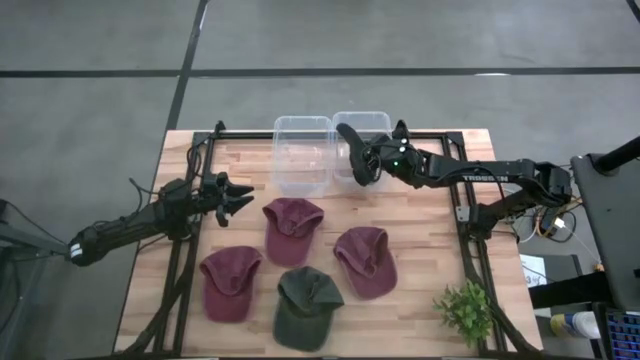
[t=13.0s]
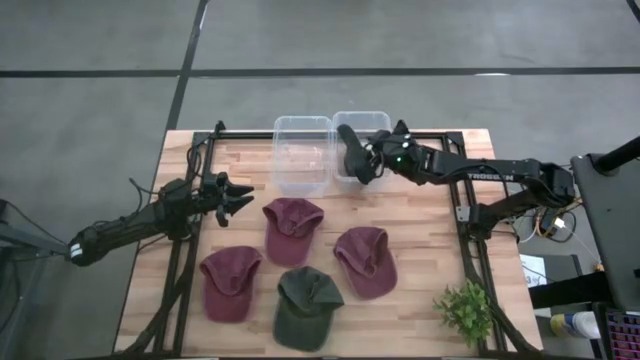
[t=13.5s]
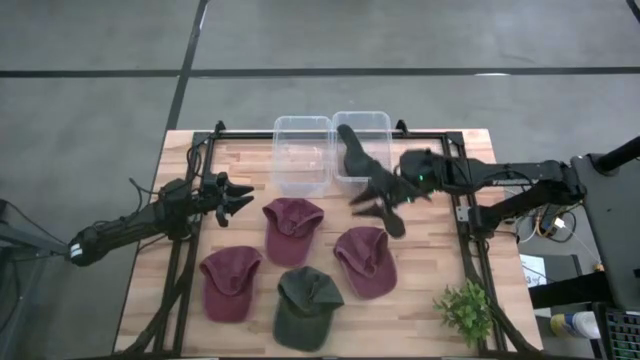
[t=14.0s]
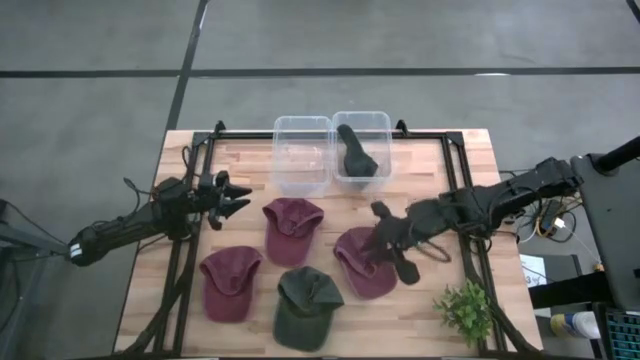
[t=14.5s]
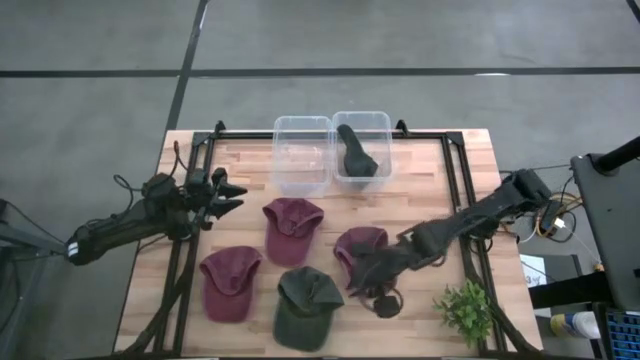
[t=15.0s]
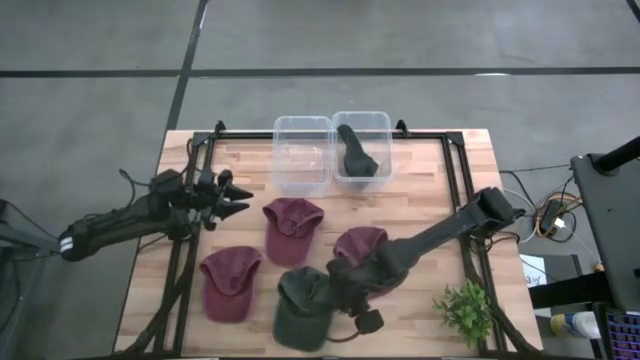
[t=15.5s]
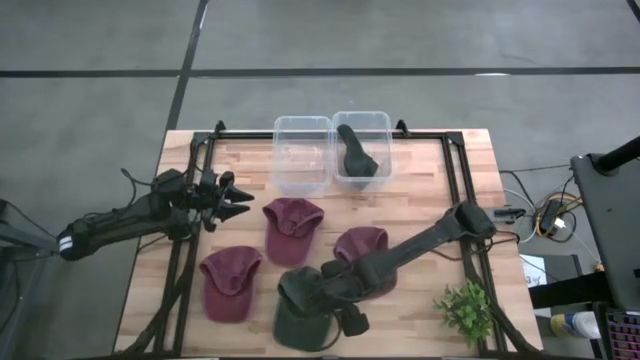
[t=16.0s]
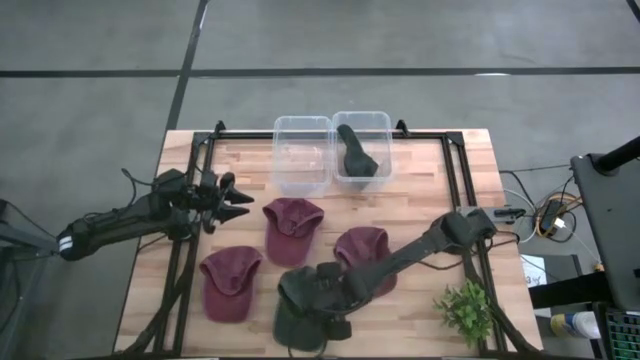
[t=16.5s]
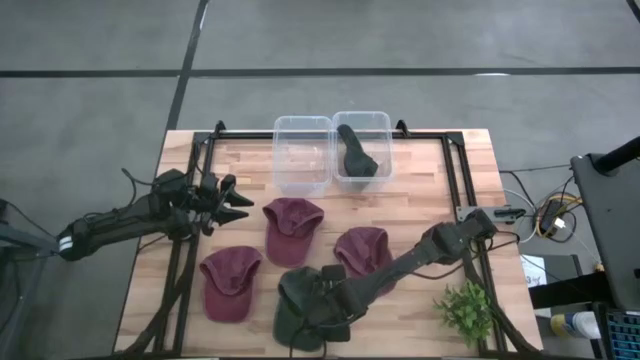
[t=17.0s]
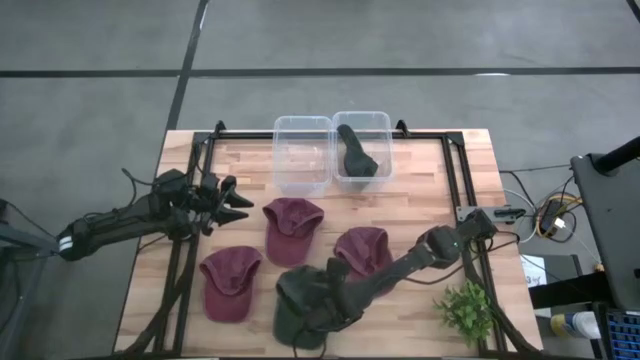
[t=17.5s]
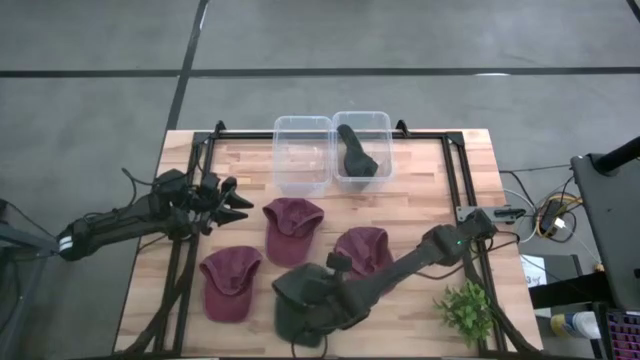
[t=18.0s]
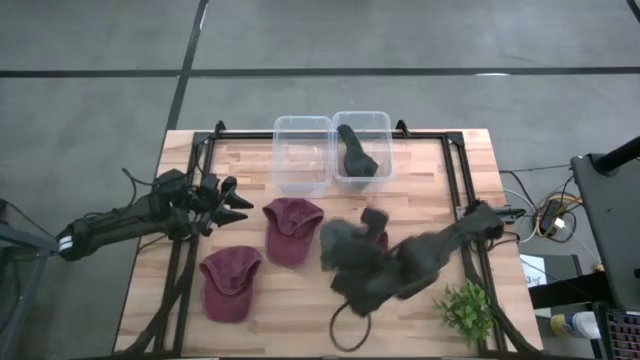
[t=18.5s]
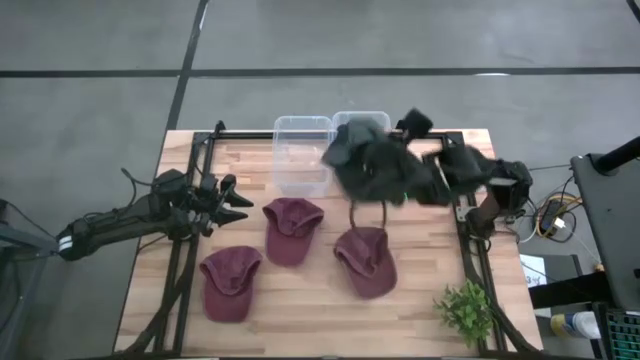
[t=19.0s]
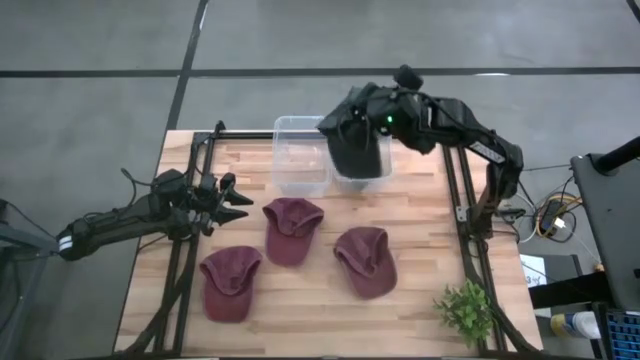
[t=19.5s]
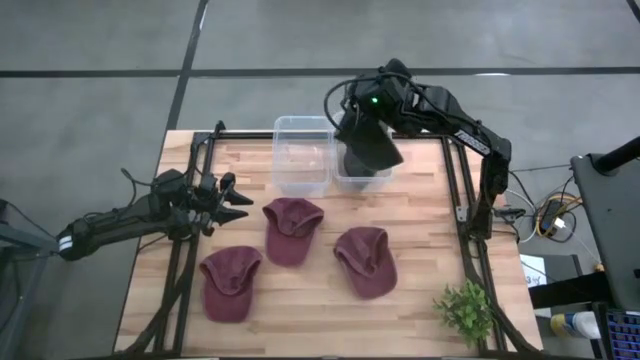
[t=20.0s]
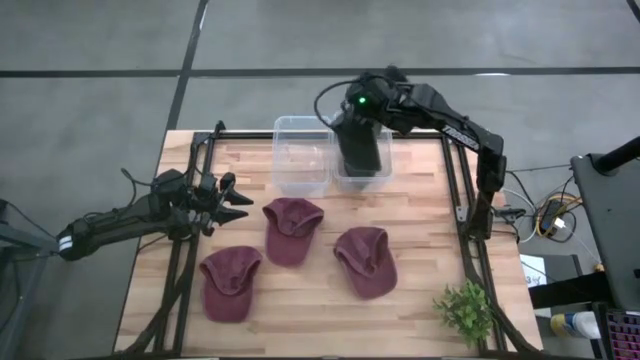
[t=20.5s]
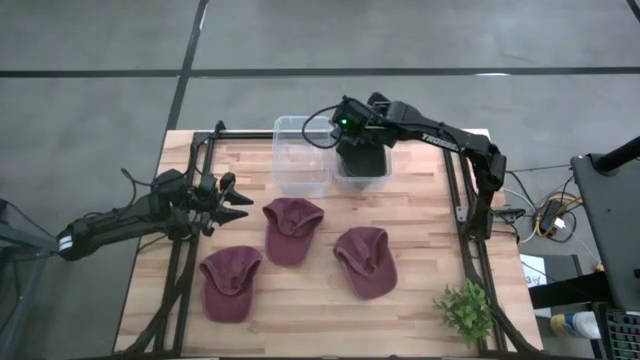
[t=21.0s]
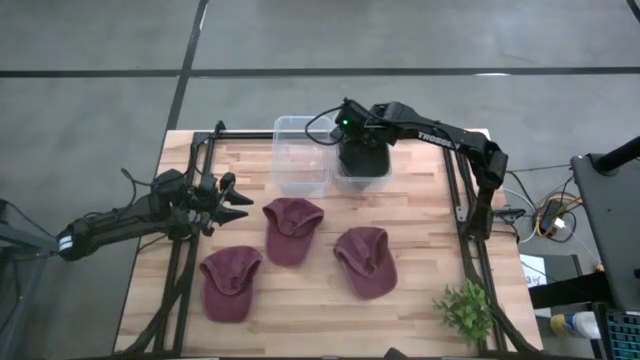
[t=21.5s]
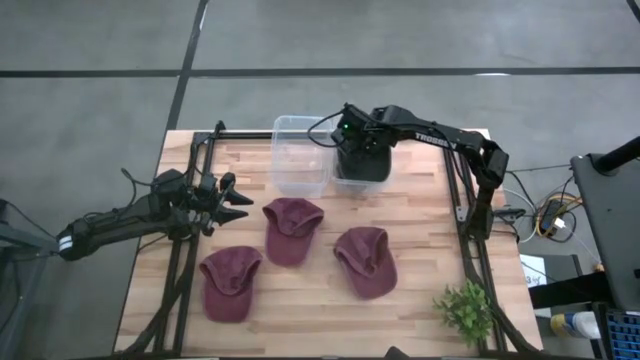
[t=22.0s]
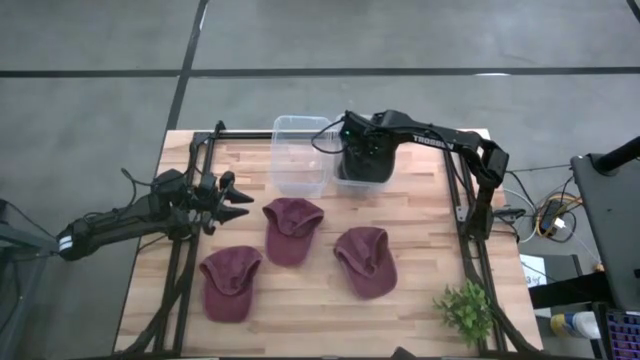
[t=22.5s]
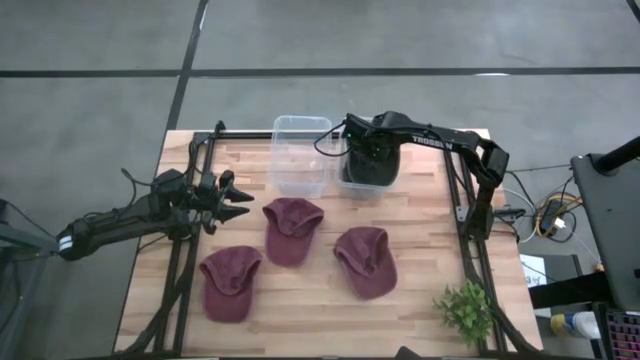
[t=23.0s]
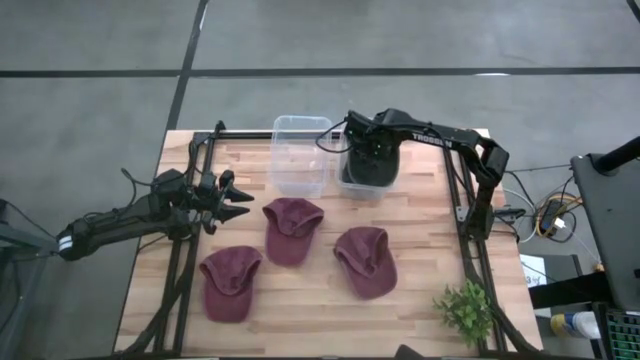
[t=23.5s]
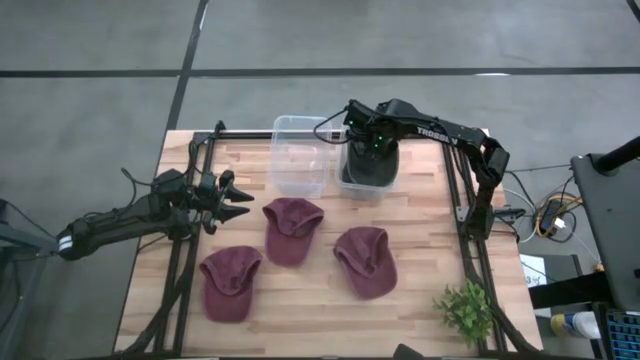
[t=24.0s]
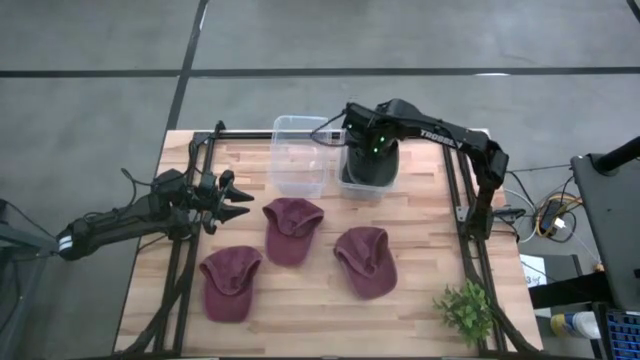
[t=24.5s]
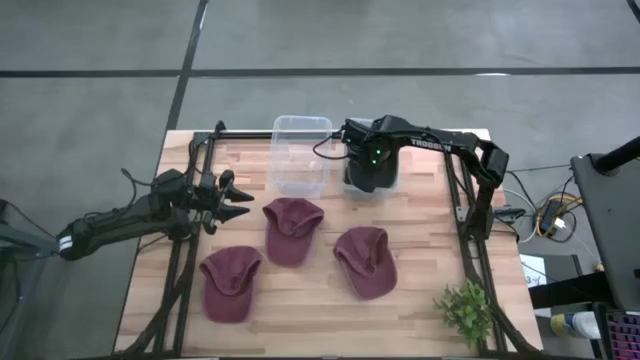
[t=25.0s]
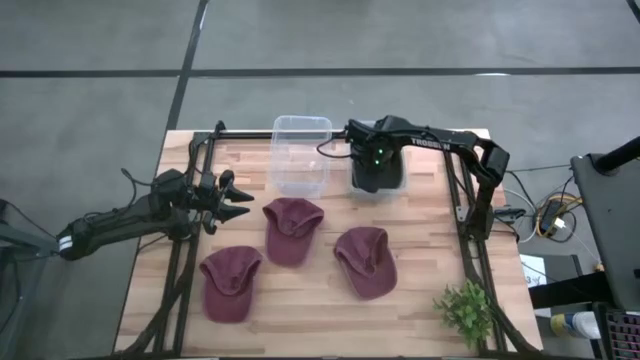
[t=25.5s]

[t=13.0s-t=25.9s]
Task: Pick & Place hat
Put the green cap into the right transparent bin

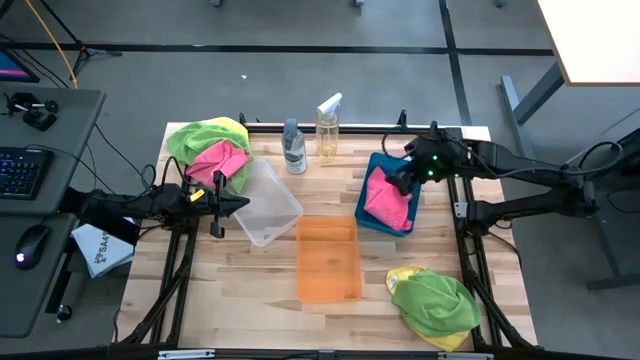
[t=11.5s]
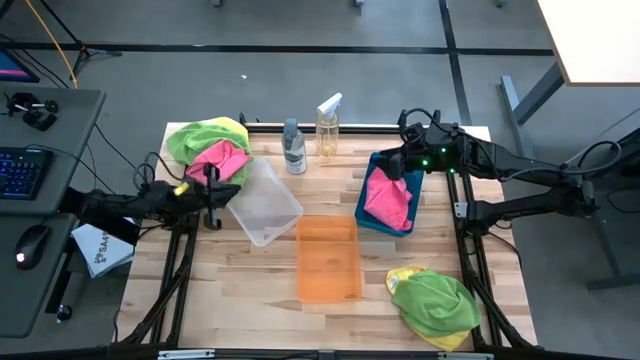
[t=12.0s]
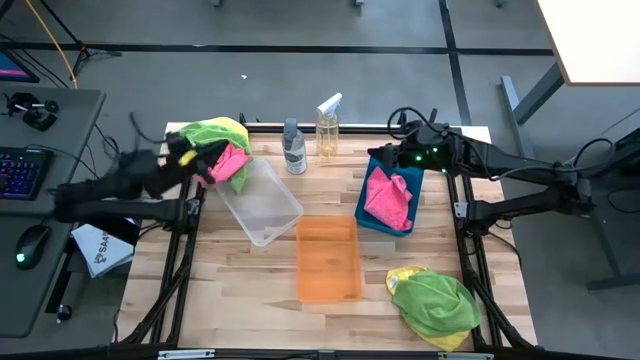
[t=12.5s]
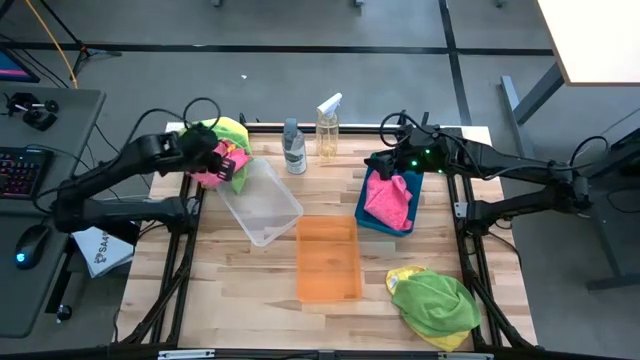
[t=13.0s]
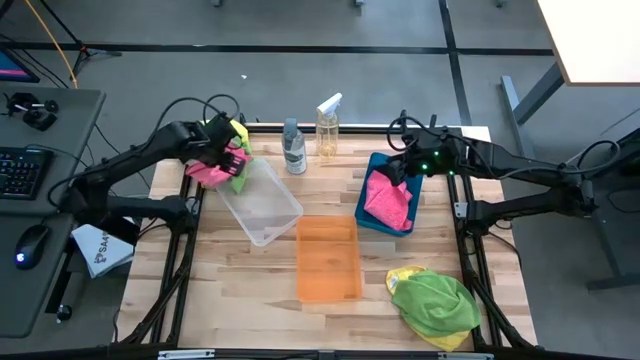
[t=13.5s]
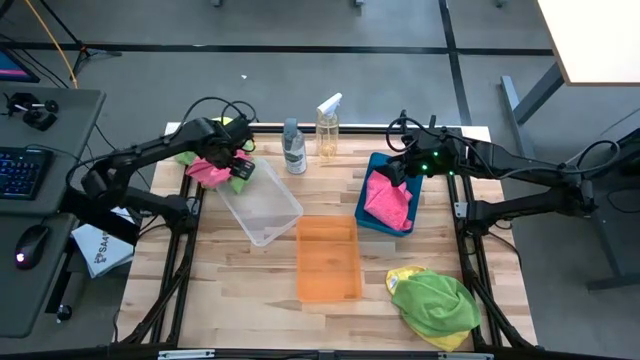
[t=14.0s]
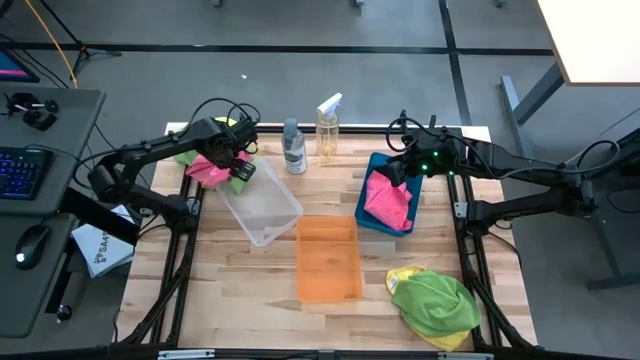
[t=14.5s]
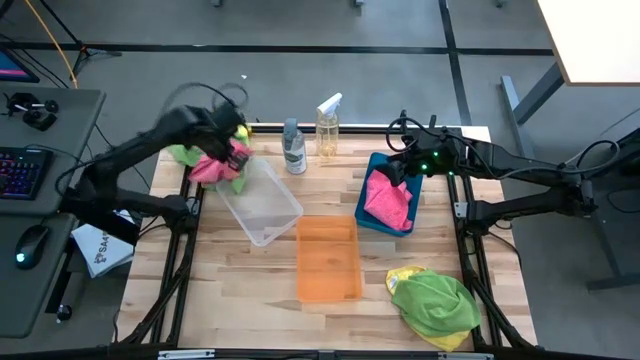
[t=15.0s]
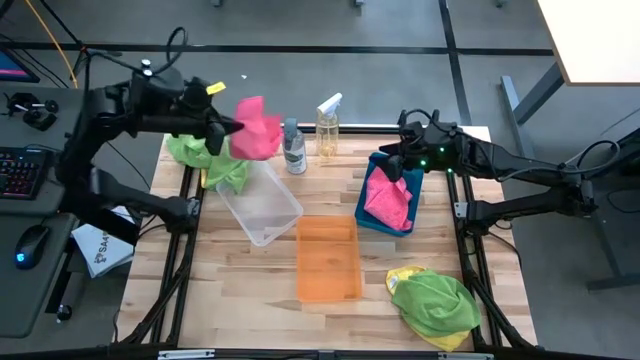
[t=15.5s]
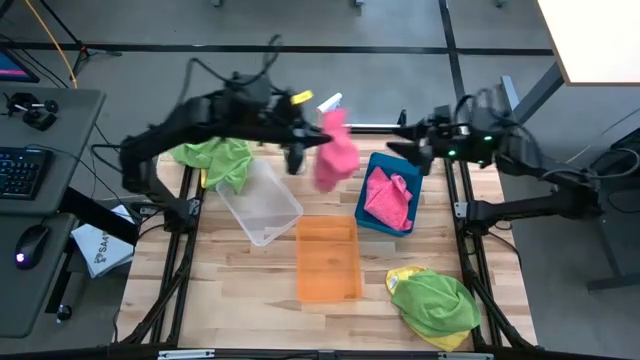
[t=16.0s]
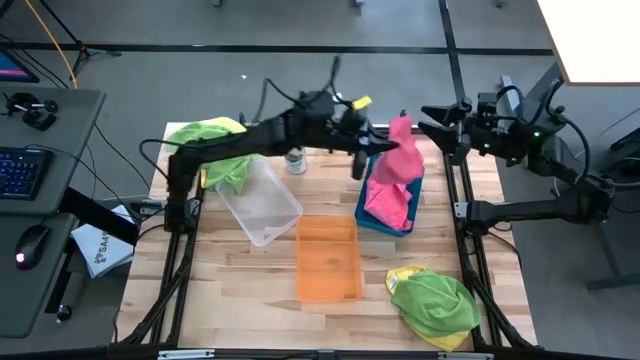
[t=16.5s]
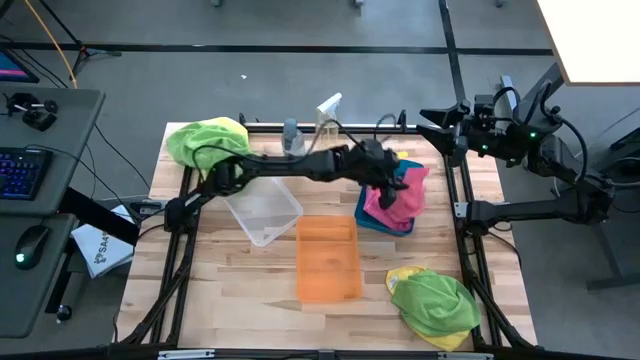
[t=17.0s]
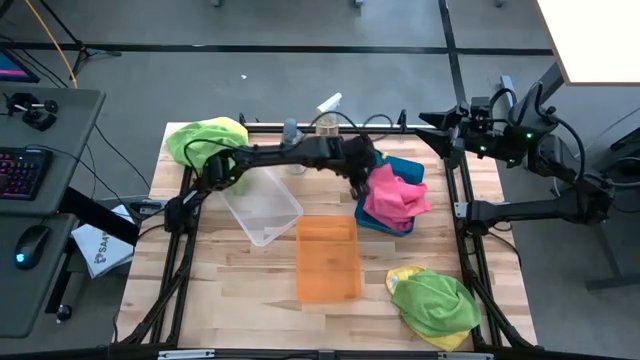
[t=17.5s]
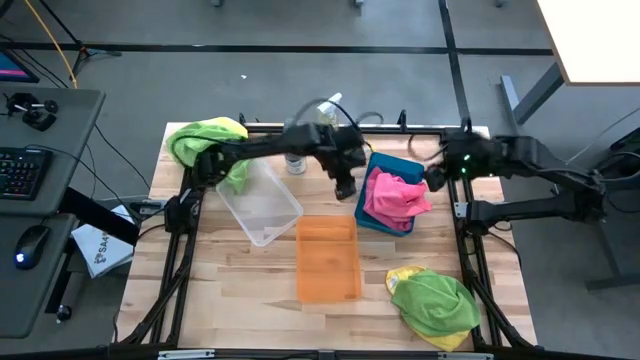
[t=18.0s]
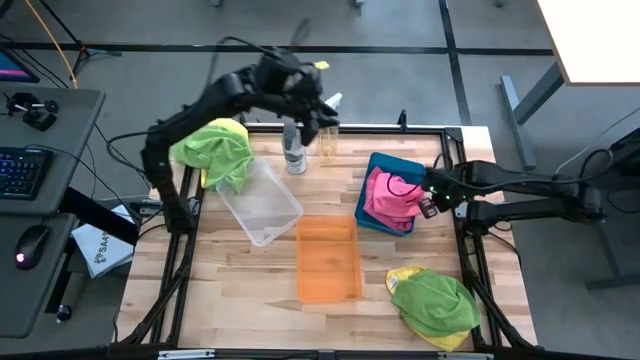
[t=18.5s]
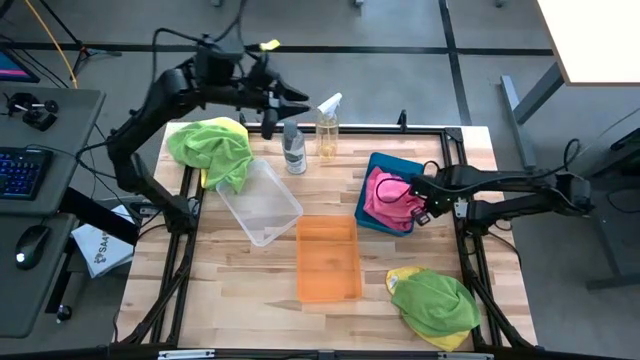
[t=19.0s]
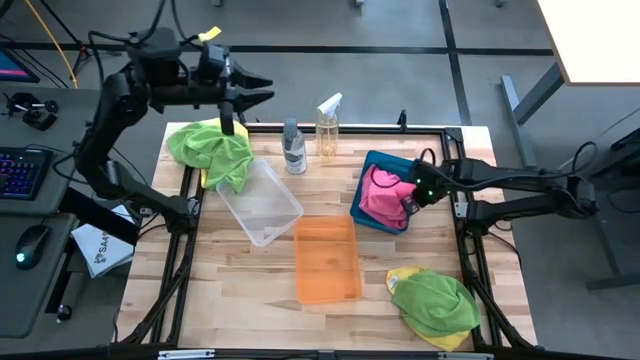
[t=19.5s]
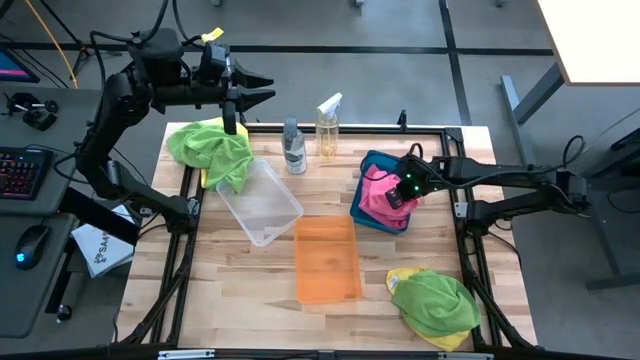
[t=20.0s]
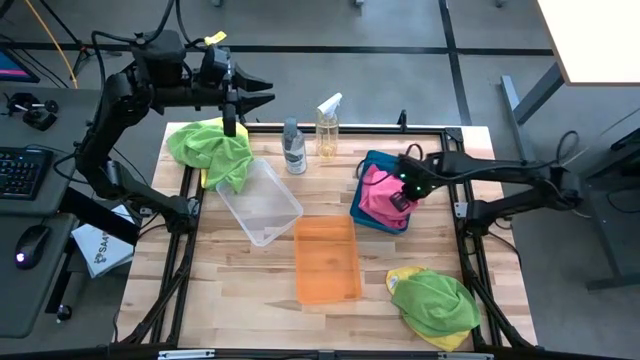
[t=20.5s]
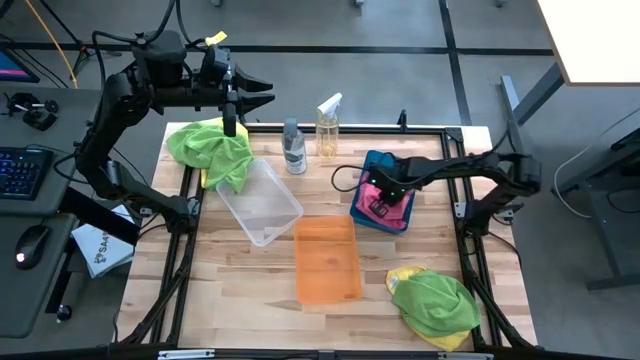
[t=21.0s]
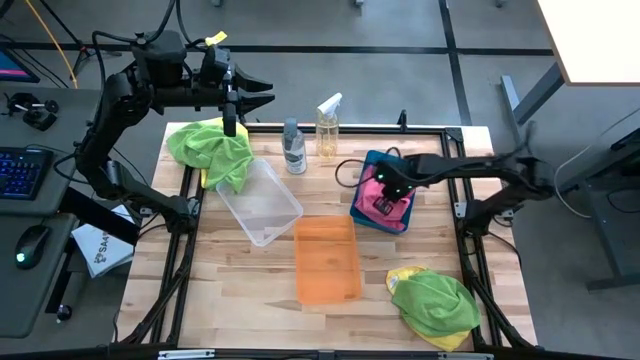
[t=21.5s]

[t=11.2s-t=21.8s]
Task: Sort microfiber towel by color & place in baskets
Put the pink microfiber towel into the blue bin
